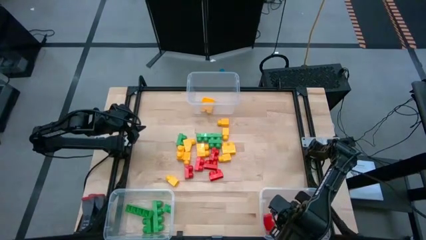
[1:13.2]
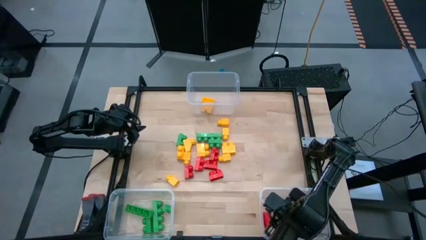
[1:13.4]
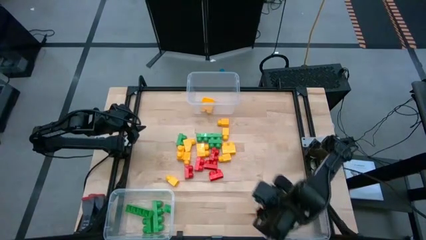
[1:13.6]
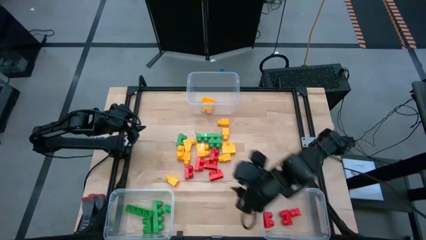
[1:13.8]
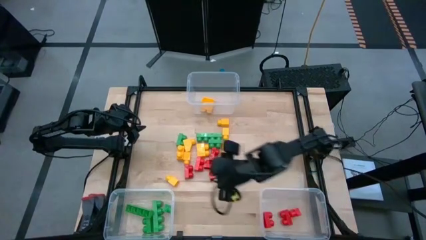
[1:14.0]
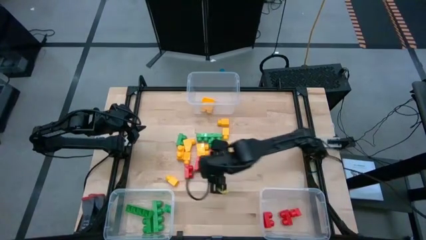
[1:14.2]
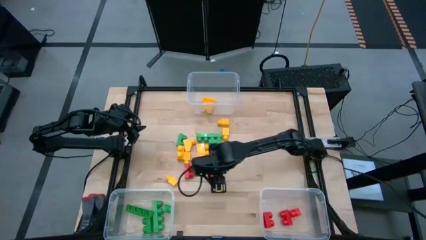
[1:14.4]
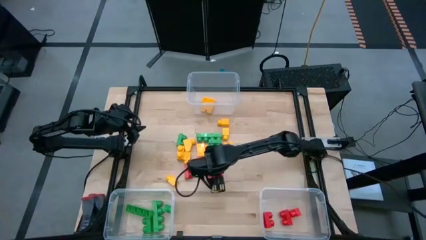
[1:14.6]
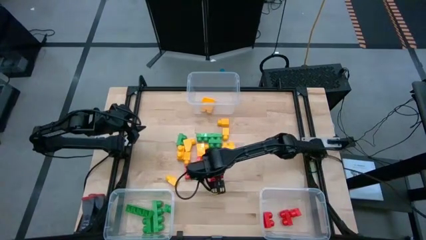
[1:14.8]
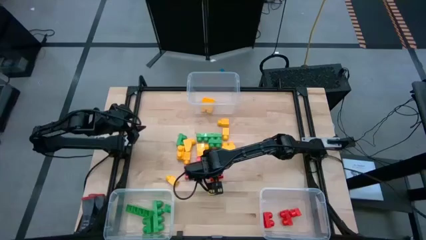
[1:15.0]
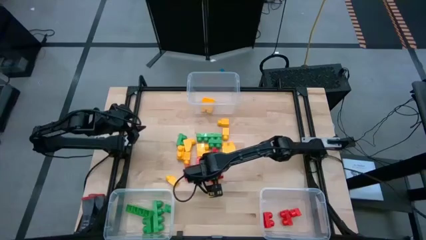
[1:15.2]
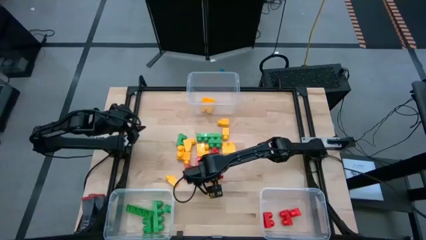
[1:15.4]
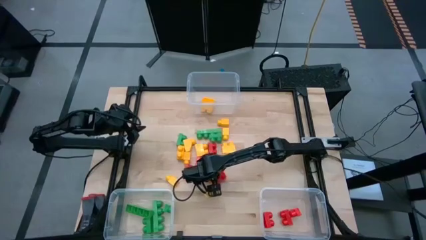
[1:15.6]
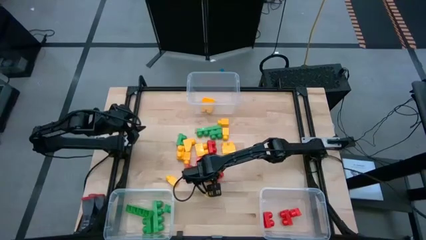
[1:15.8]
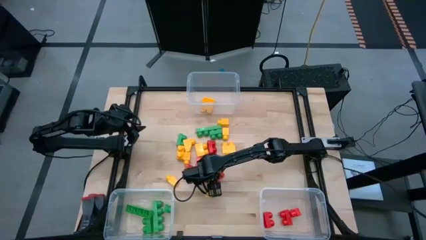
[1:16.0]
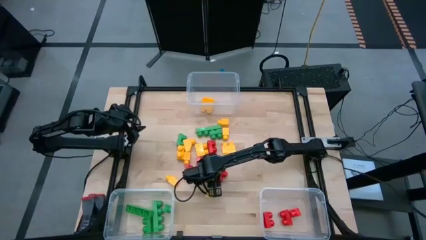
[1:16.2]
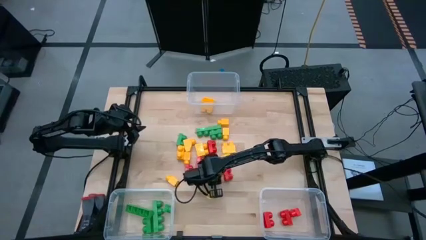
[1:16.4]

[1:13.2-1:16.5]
Task: Sort blocks
Put the red game piece into the bottom right transparent bin

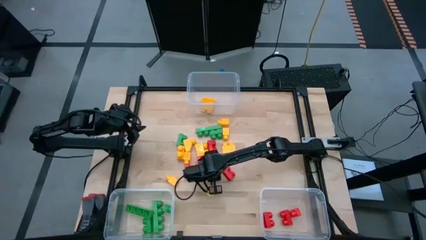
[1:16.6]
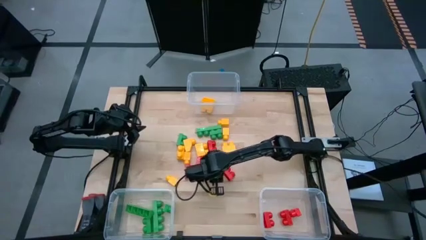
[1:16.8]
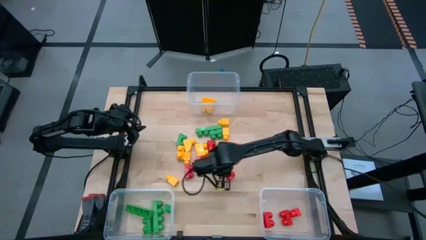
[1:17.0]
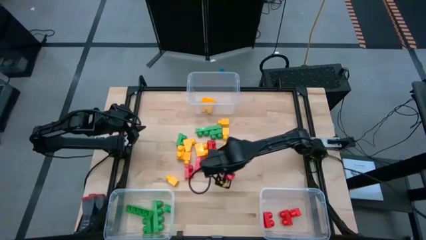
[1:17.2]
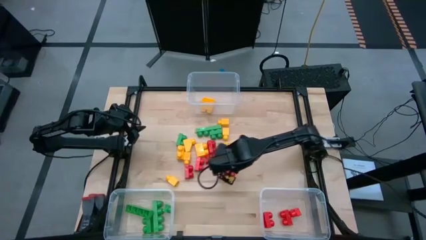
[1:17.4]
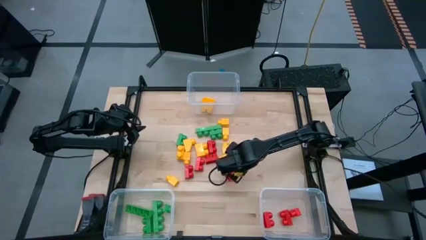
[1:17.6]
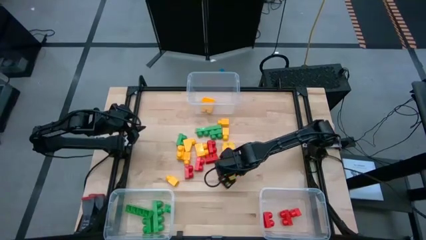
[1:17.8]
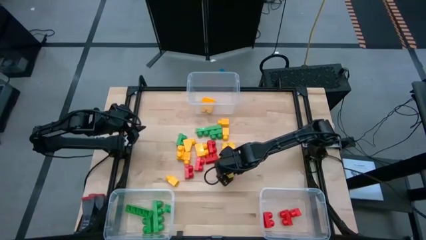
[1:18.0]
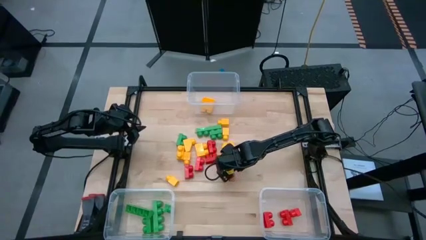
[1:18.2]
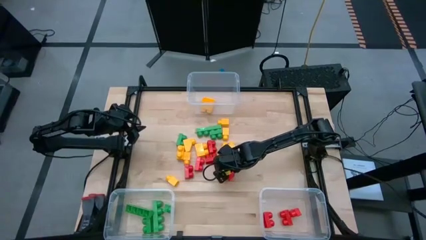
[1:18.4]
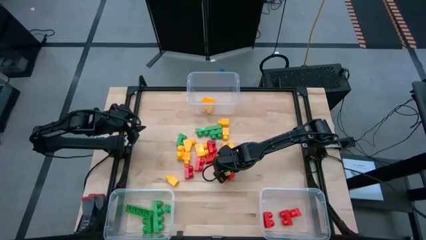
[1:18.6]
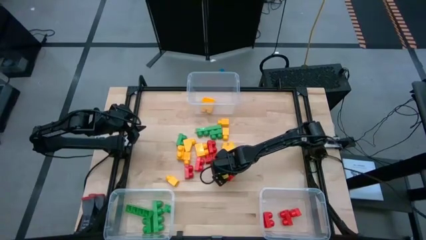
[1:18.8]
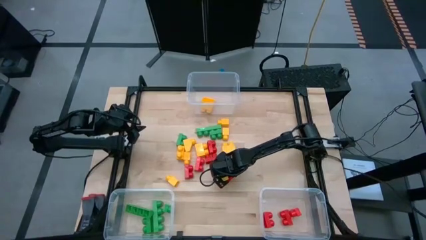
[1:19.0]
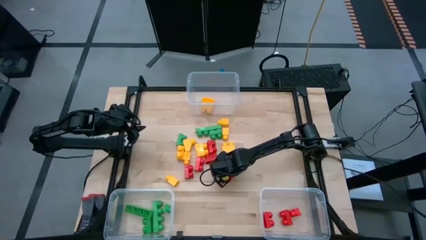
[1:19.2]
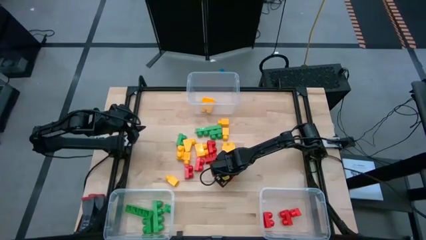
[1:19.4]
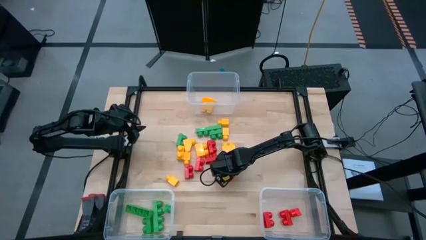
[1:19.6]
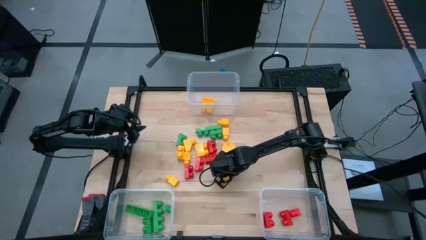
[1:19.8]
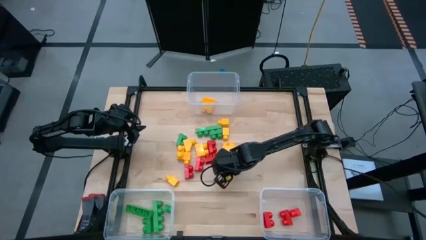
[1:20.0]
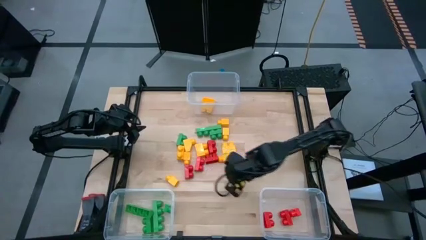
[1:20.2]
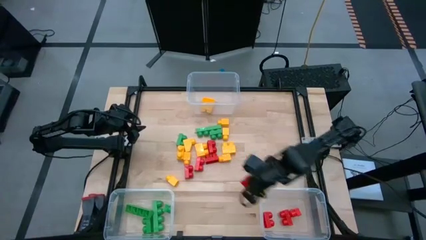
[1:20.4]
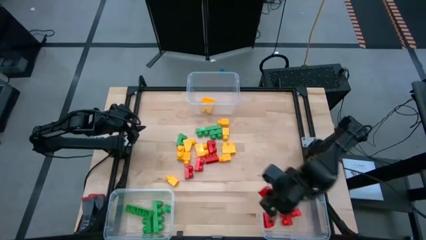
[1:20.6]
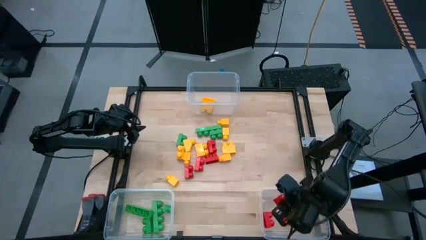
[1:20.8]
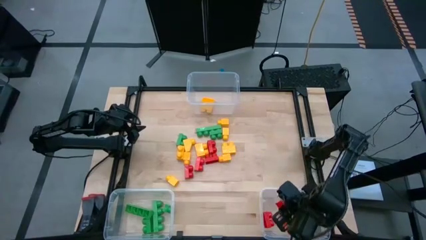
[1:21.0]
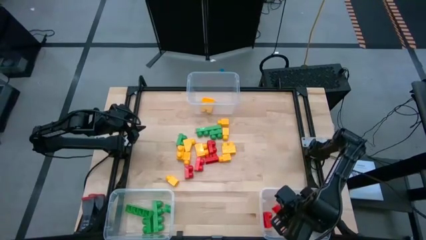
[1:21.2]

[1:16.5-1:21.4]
Put the red game piece into the bottom right transparent bin

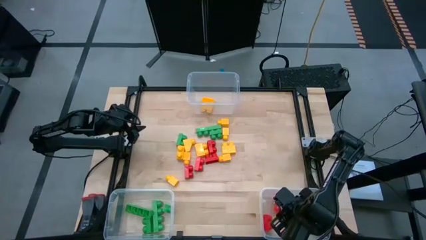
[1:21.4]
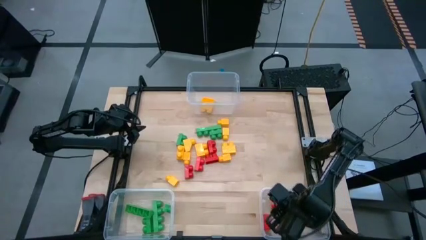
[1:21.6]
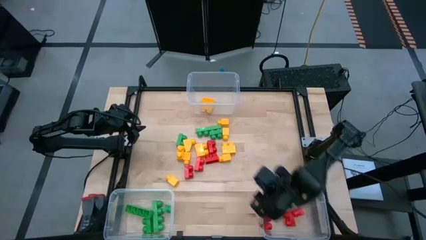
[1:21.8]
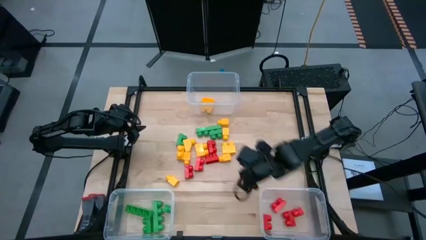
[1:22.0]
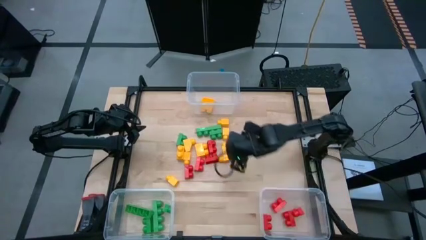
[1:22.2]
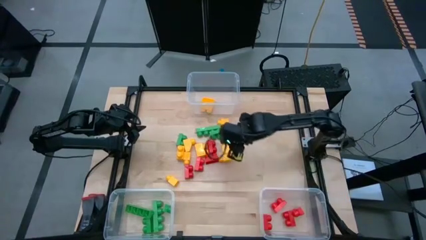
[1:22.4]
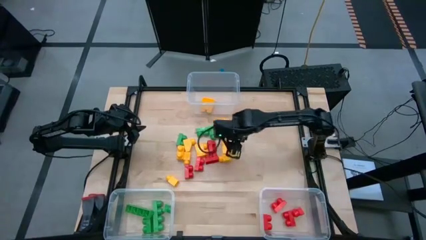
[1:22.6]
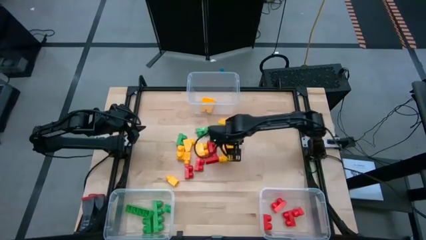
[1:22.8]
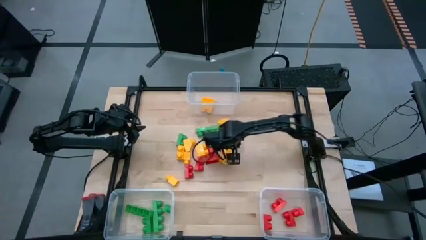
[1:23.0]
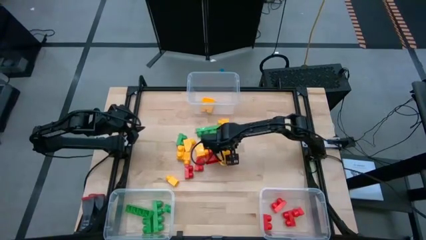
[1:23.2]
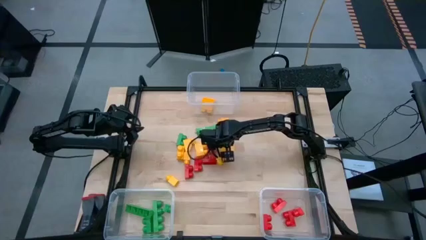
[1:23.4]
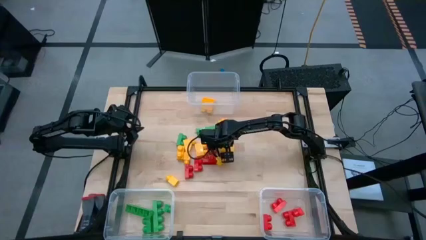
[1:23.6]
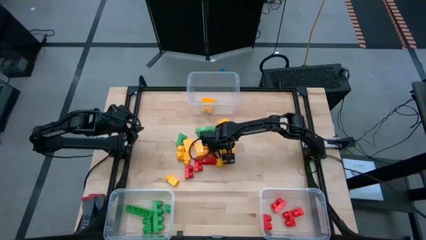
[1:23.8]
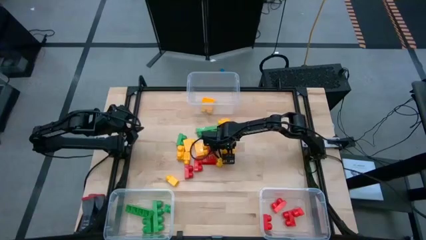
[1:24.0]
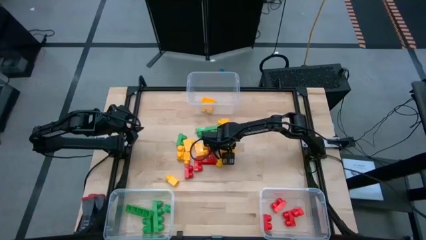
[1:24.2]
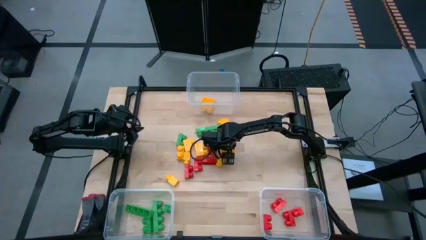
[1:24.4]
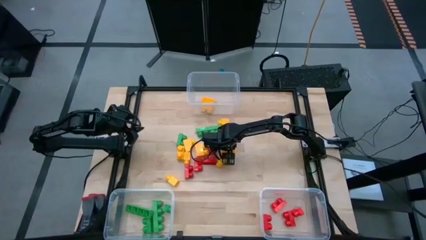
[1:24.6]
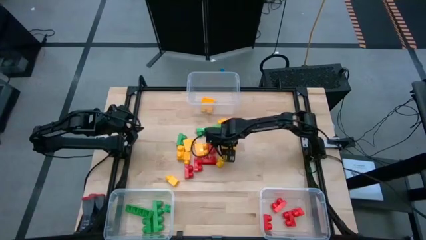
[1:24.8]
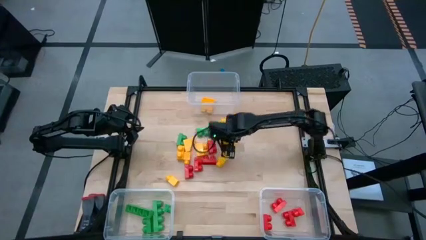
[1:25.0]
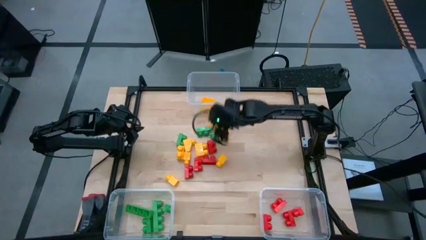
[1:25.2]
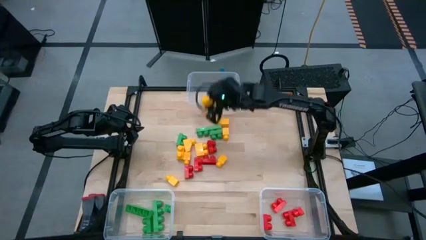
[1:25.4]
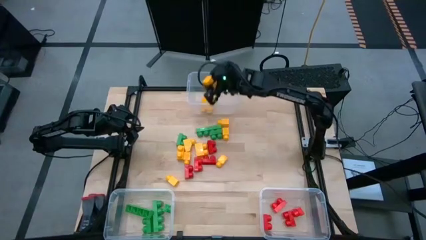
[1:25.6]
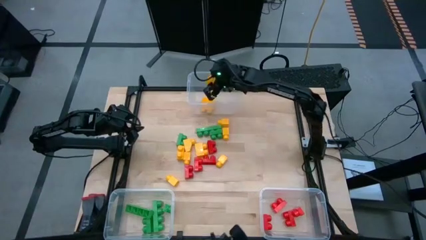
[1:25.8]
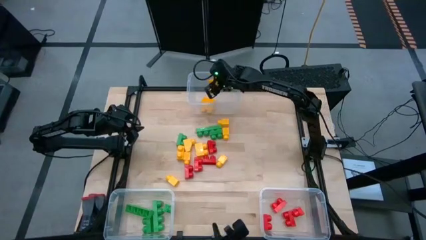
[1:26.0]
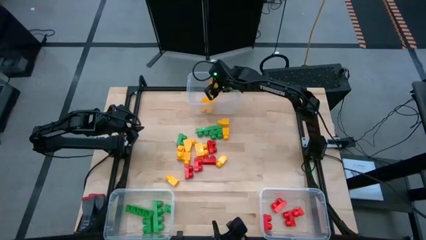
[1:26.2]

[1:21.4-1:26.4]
Put the yellow game piece into the top transparent bin

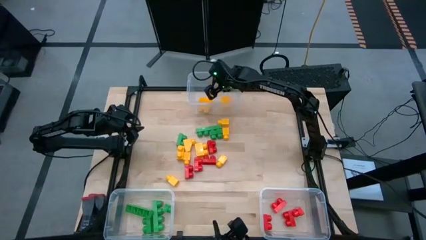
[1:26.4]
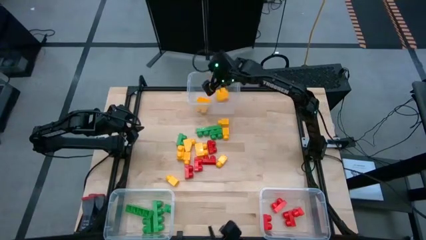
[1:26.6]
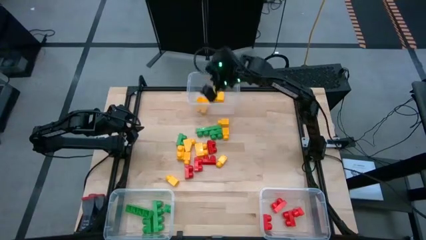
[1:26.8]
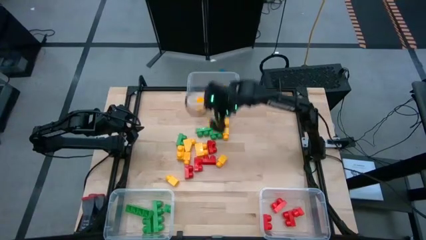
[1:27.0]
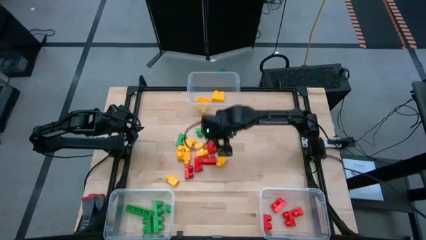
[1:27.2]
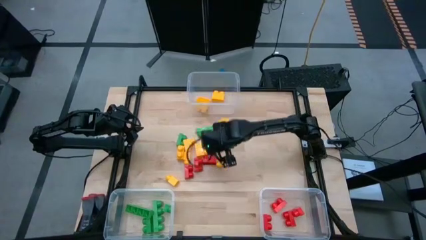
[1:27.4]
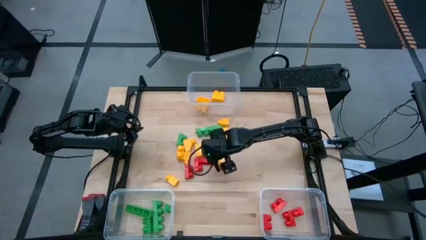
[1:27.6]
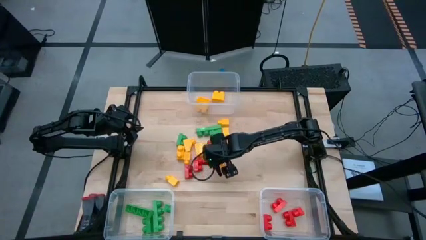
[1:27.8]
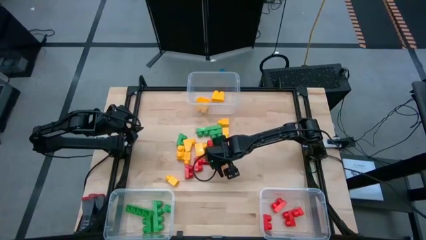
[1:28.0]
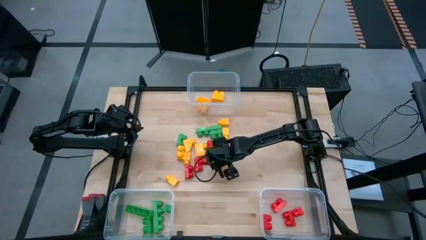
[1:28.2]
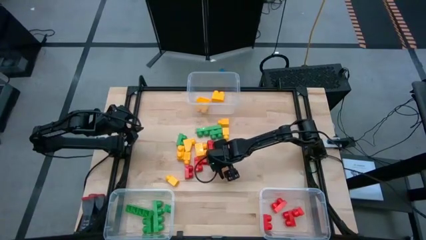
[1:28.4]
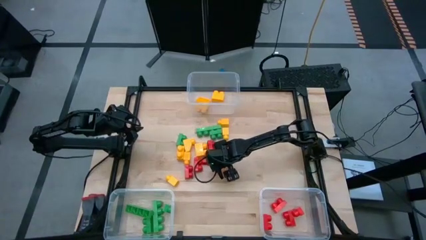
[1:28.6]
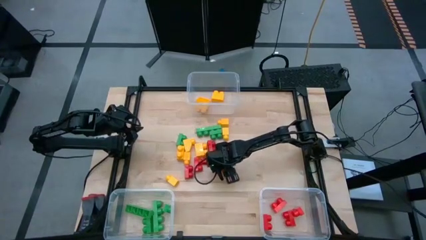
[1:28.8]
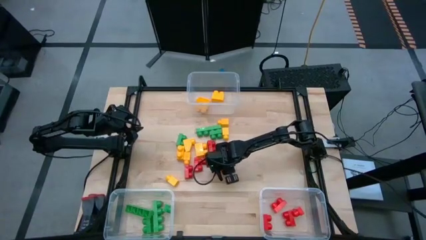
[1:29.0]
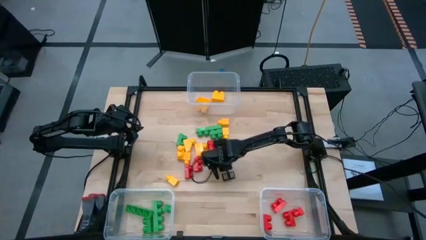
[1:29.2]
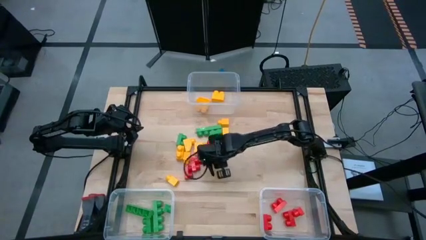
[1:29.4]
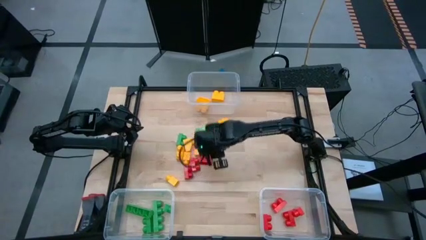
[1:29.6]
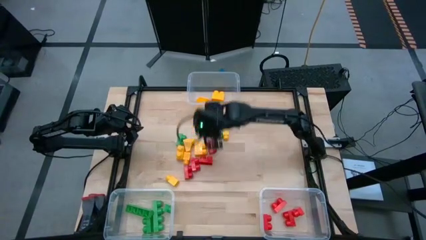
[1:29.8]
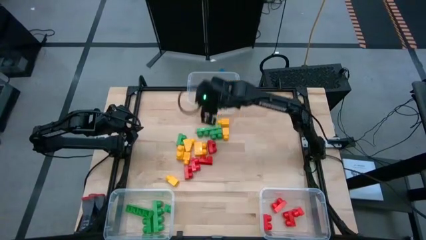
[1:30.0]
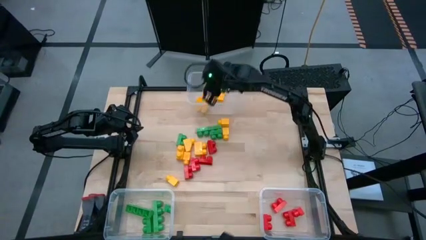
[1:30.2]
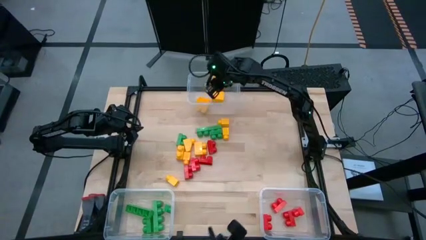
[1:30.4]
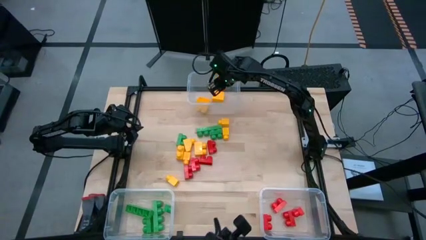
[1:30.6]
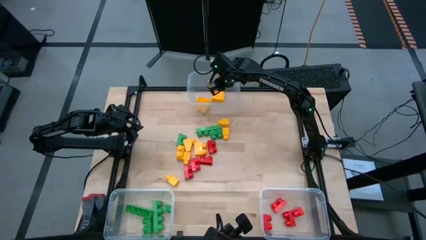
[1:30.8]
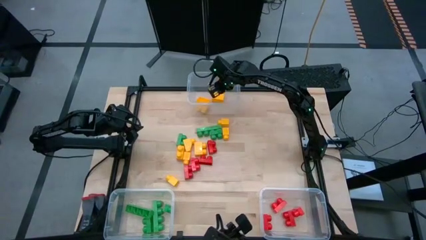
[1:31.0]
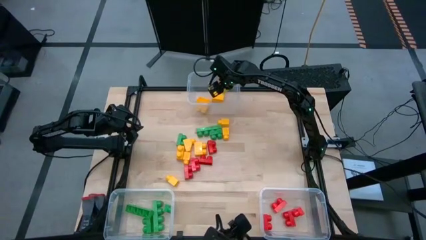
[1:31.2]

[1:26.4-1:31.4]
Put the yellow game piece into the top transparent bin
